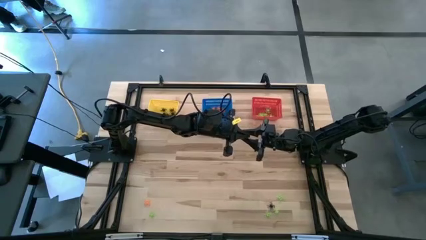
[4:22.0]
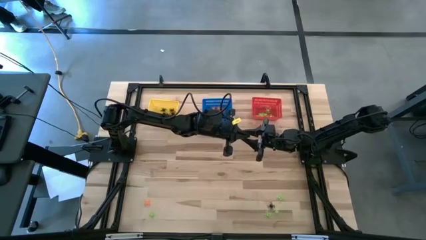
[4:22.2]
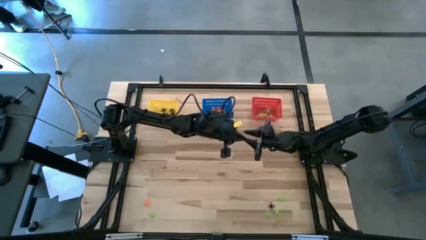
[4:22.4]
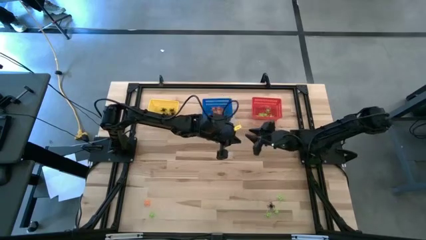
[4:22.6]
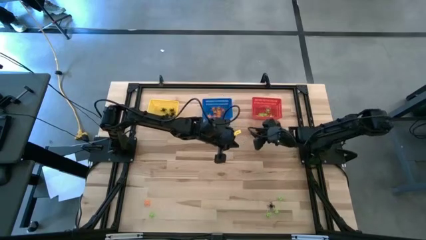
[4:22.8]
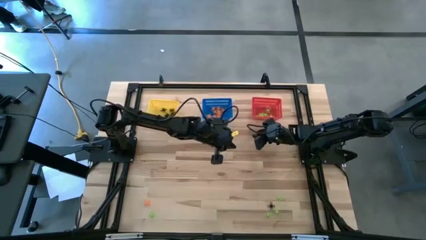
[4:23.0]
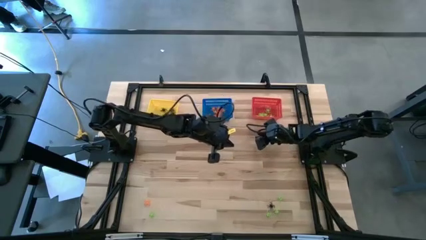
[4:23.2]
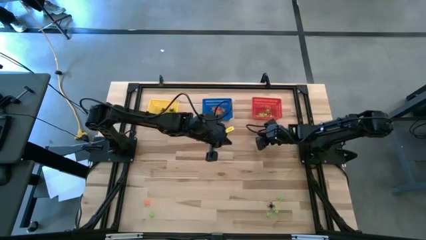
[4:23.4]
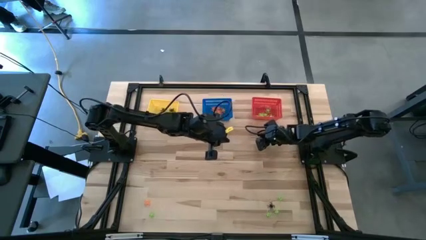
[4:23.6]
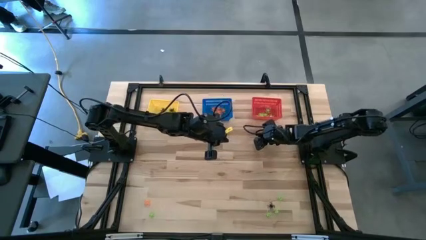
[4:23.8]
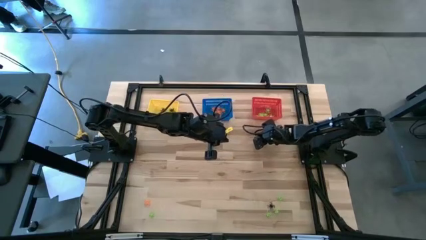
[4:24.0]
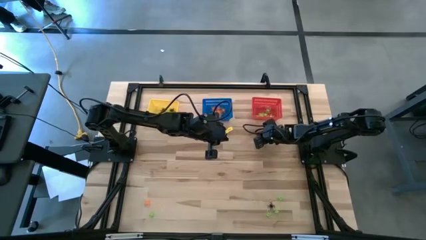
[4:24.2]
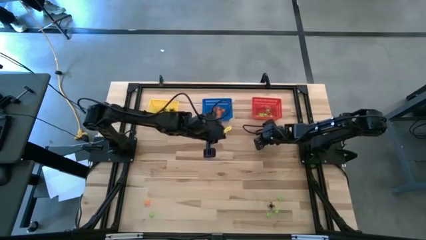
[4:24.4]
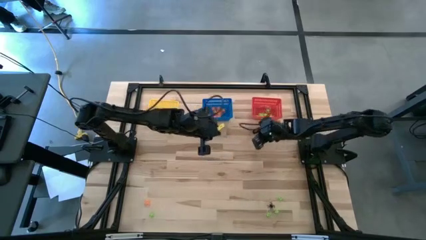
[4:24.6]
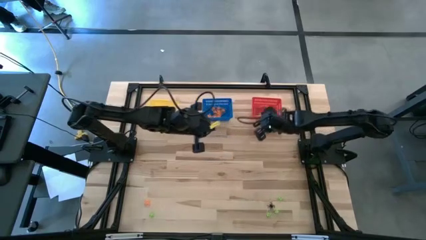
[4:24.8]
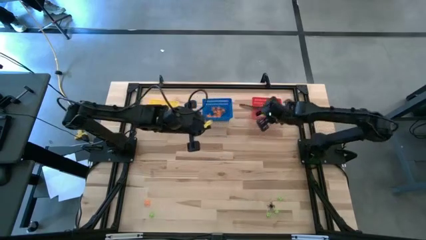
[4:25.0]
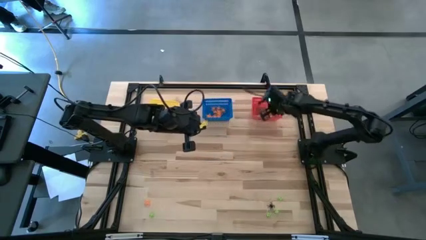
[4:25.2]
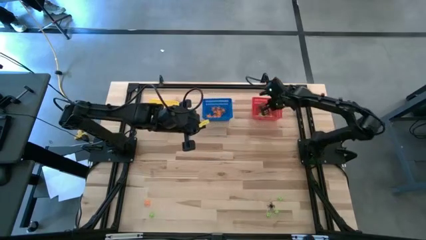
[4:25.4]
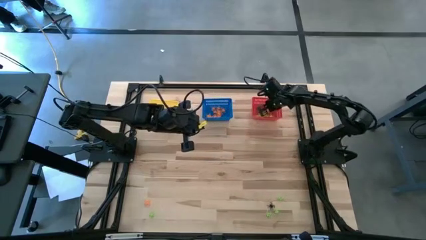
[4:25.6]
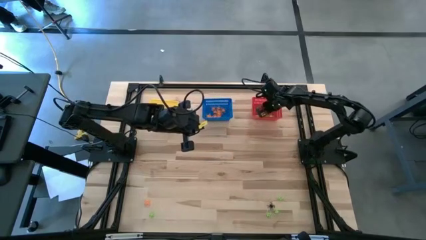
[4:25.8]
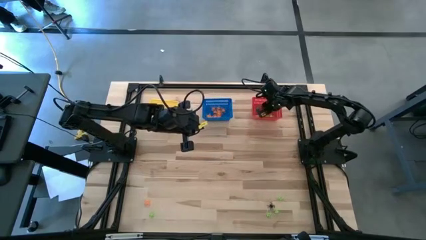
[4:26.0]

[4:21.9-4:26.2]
Task: Sort Halloween decoration
Put the green spider toy into the red basket

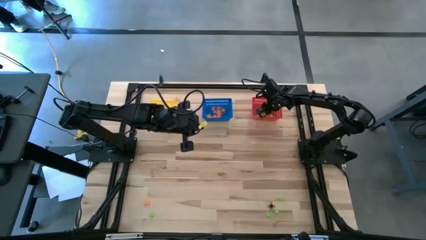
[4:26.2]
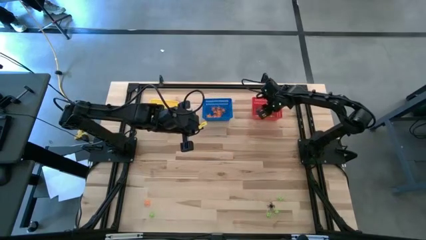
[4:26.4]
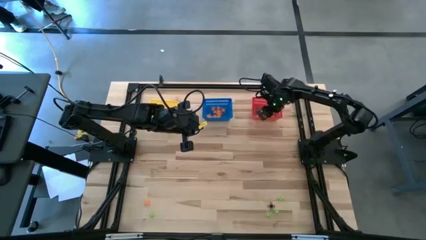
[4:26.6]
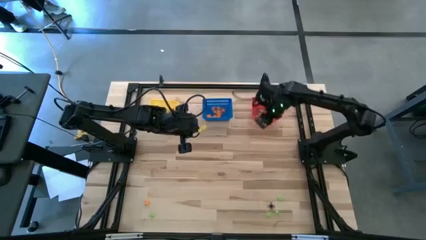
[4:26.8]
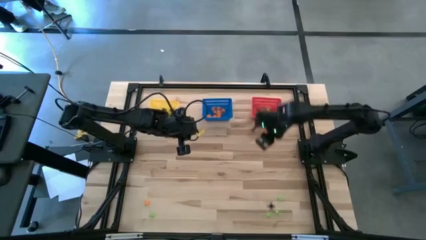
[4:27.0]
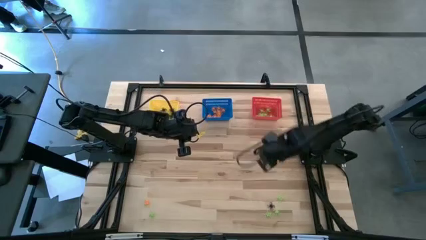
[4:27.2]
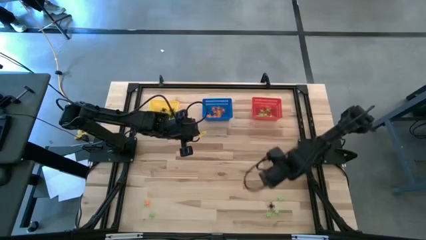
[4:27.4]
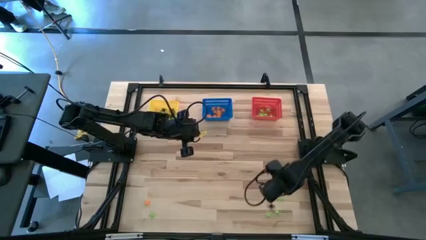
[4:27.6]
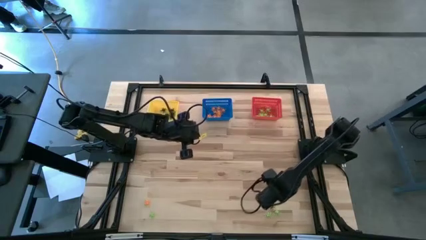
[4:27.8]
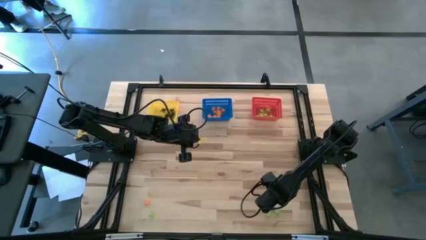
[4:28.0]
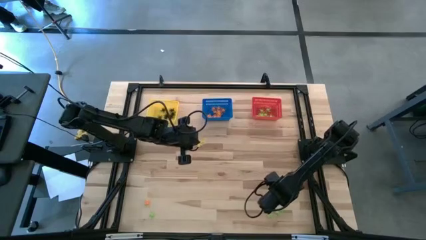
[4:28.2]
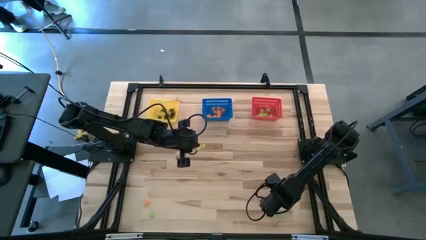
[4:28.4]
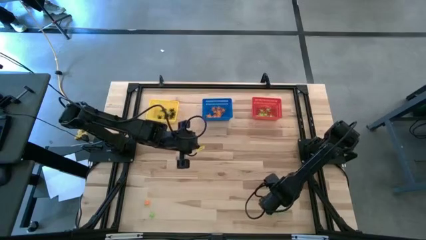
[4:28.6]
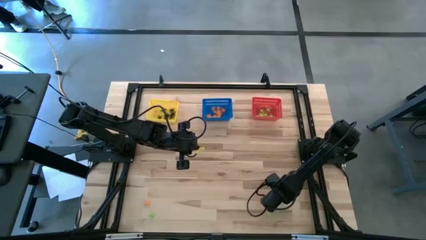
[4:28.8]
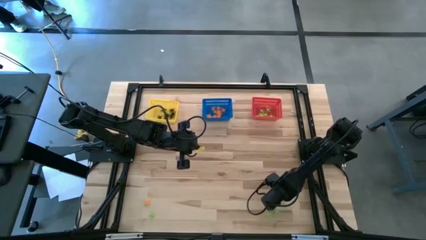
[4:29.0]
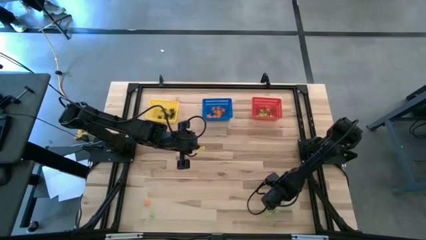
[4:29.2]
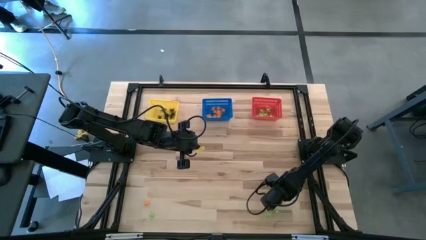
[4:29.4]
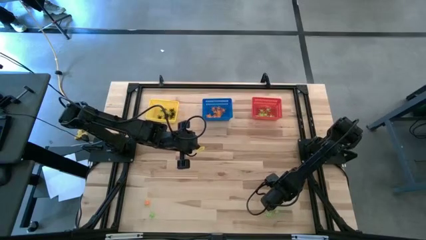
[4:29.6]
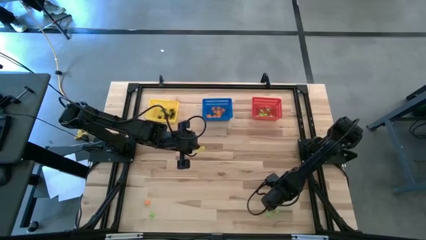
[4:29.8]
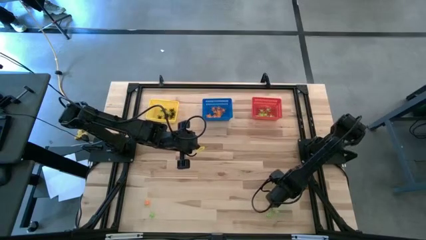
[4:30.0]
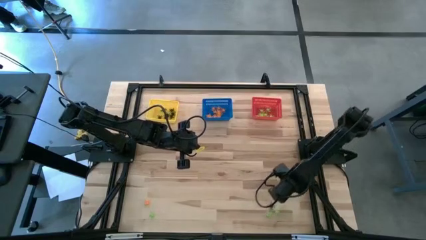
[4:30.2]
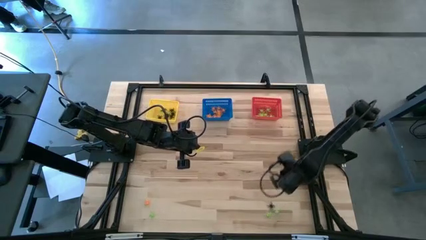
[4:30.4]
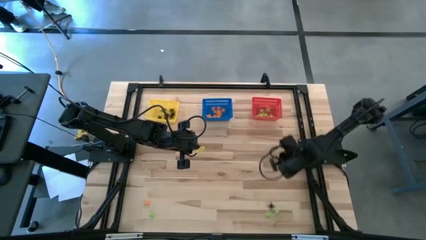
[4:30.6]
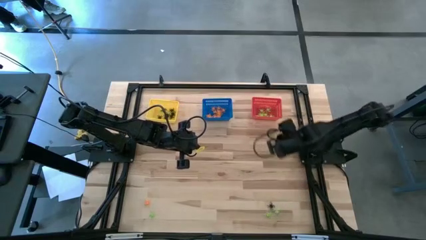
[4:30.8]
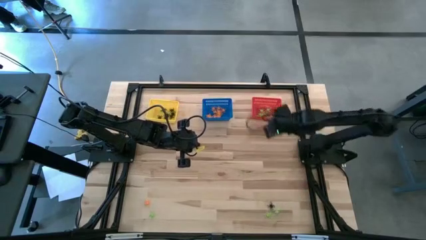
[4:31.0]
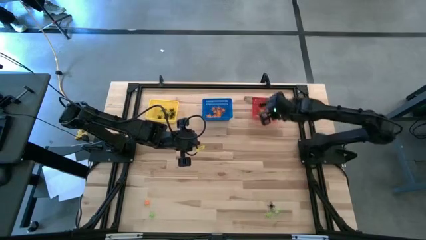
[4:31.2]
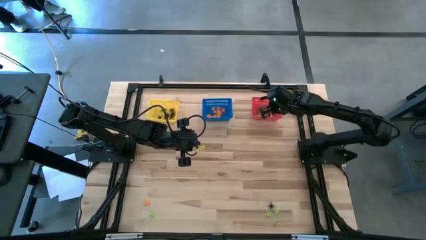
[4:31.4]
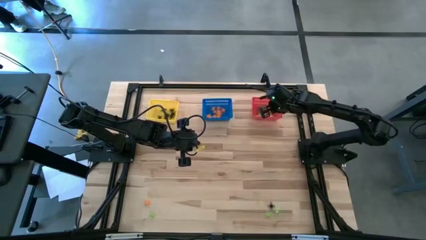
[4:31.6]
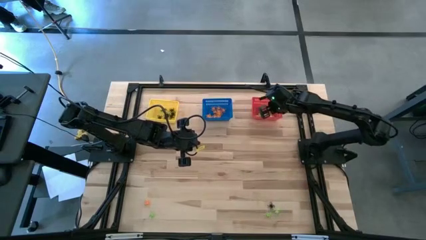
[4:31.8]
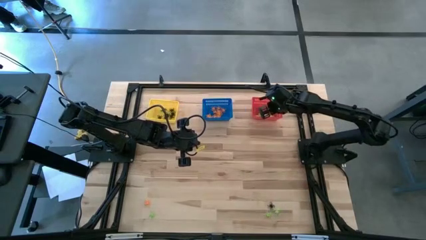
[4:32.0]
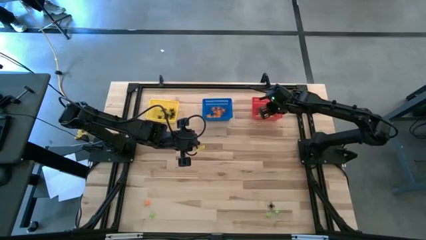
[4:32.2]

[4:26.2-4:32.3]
Put the green spider toy into the red basket

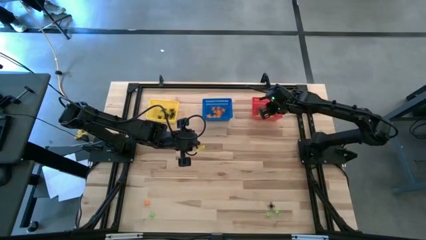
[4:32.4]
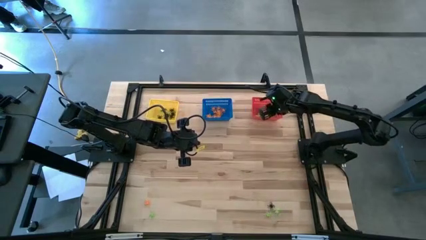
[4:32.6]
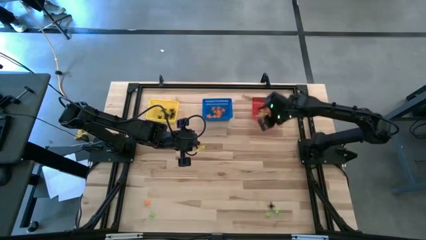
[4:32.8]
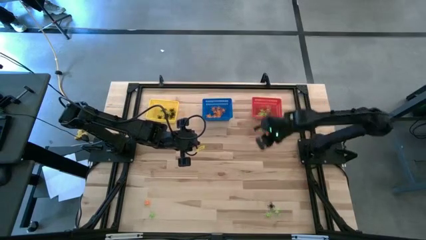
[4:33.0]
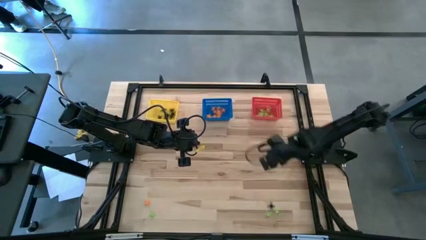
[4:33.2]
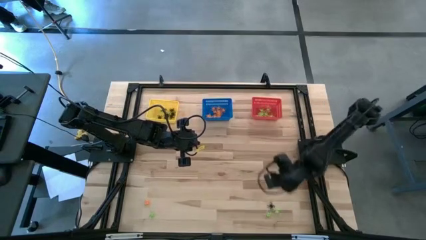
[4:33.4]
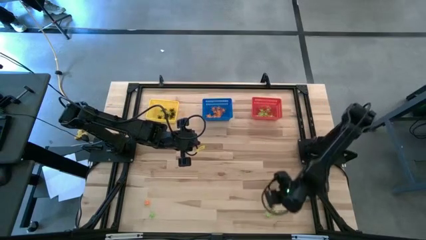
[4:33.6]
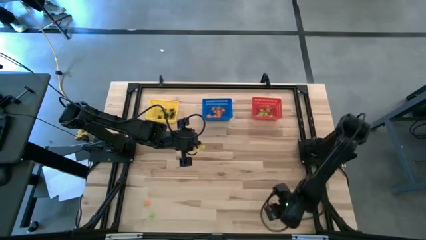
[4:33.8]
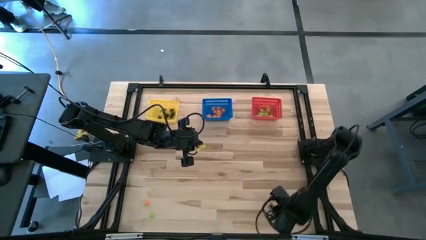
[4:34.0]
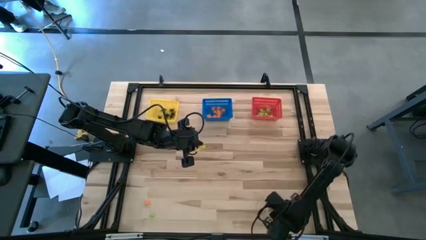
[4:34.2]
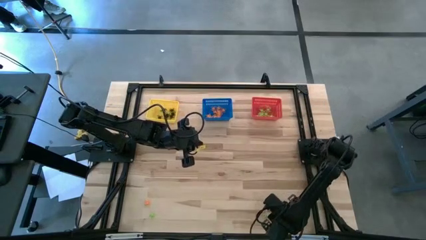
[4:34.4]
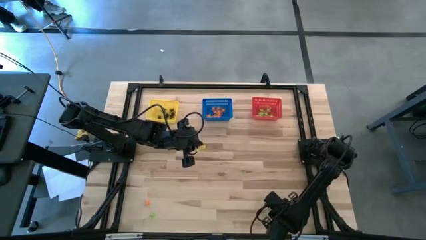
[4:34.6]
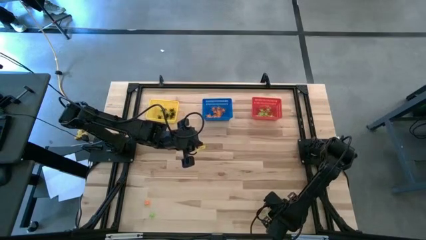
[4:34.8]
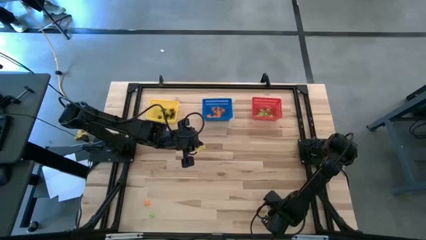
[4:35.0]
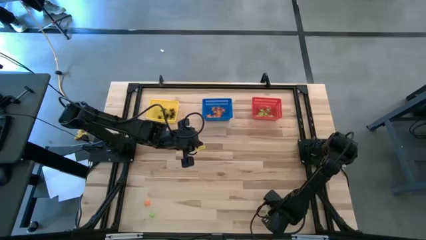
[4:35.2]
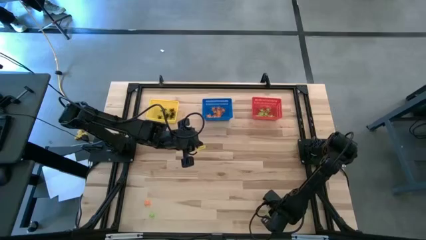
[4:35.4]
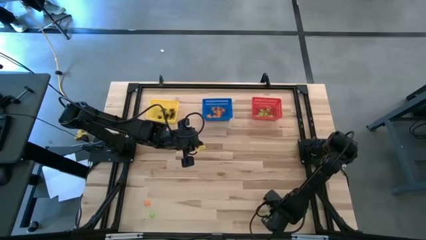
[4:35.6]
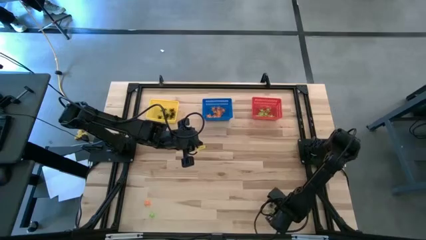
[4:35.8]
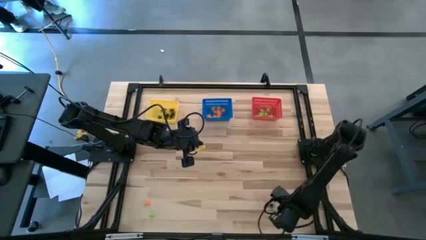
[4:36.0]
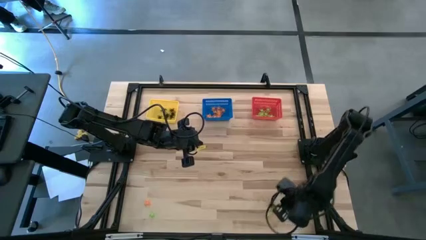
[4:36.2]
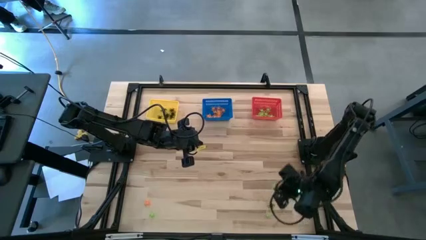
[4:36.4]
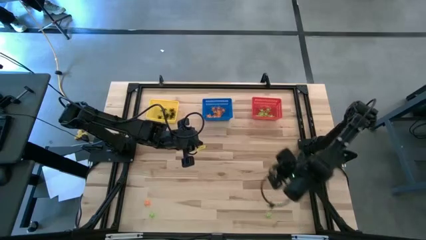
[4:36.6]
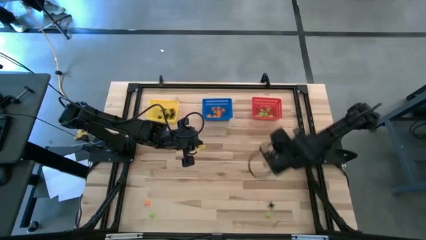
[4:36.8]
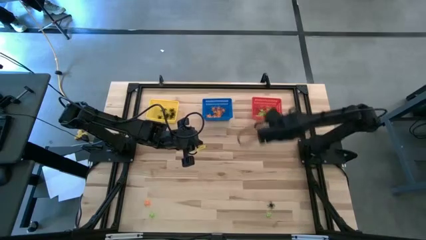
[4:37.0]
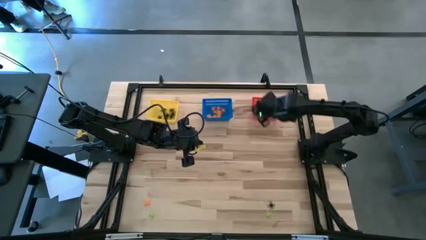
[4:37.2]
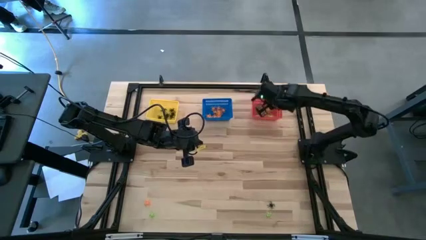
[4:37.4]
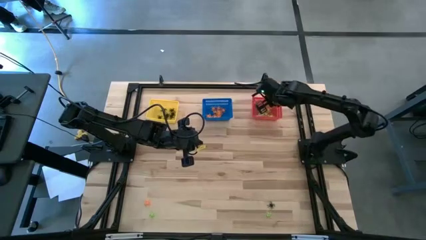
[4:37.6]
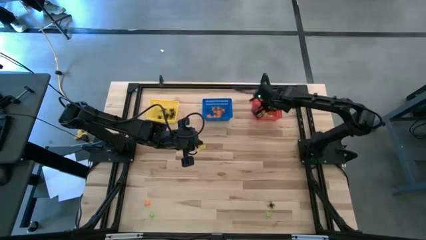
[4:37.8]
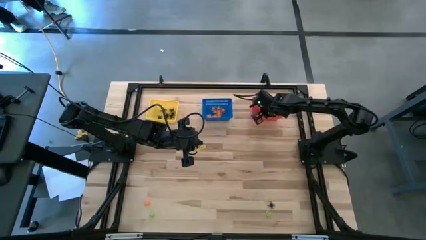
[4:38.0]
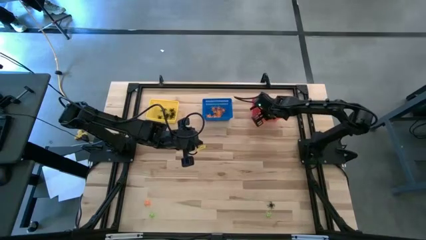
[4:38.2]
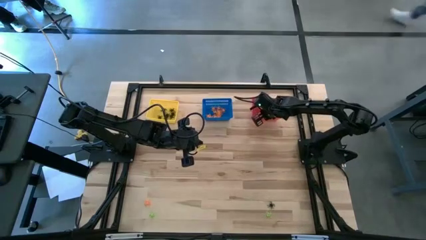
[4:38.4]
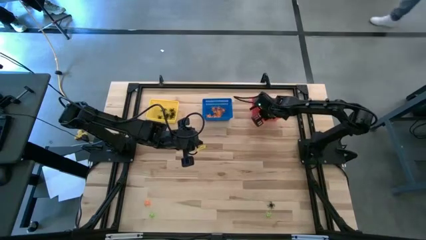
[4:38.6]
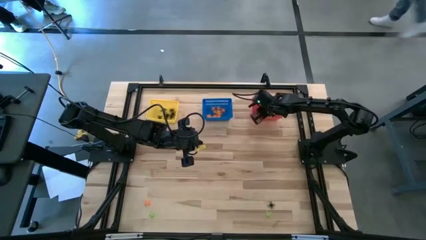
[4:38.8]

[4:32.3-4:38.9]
Put the green spider toy into the red basket
